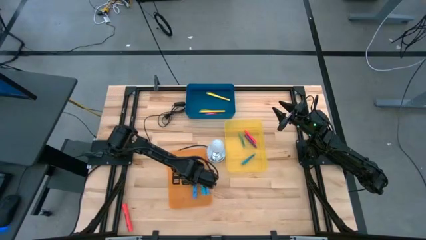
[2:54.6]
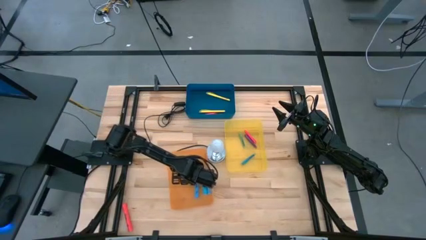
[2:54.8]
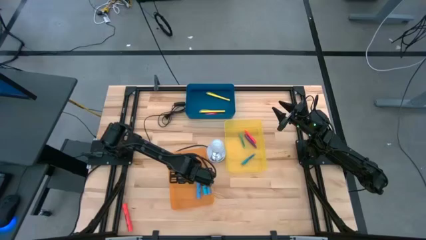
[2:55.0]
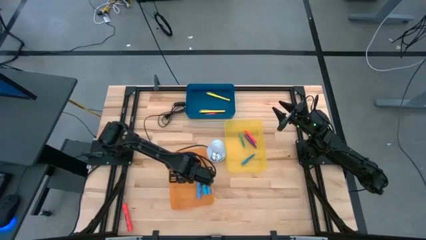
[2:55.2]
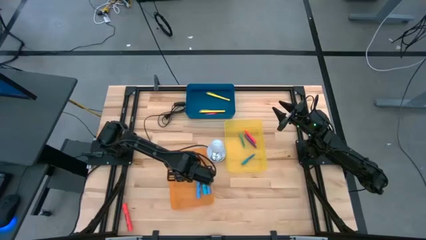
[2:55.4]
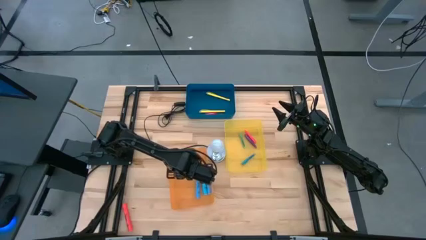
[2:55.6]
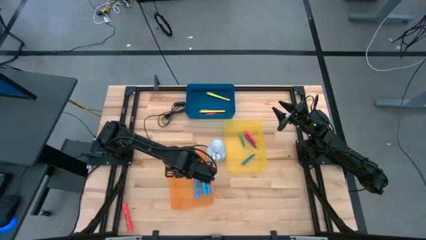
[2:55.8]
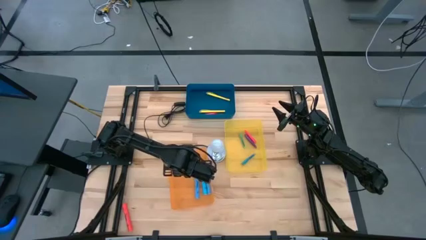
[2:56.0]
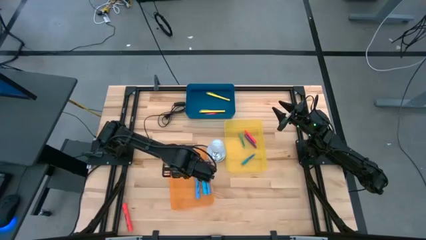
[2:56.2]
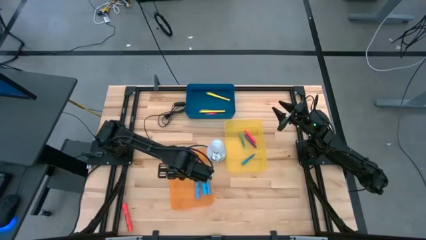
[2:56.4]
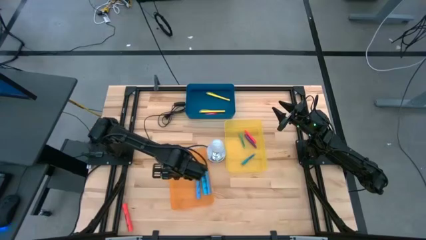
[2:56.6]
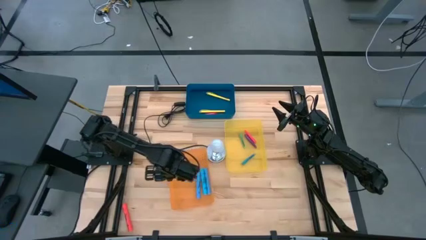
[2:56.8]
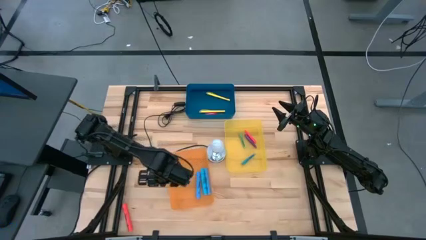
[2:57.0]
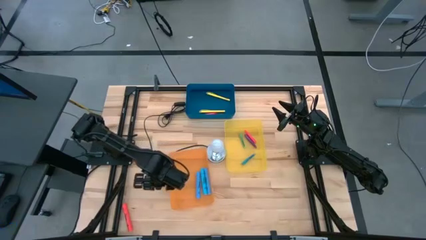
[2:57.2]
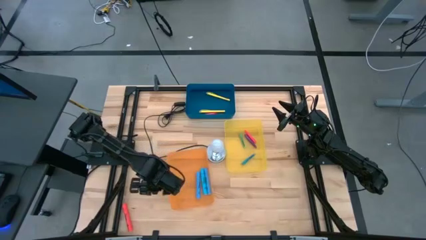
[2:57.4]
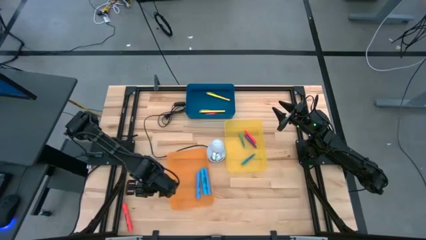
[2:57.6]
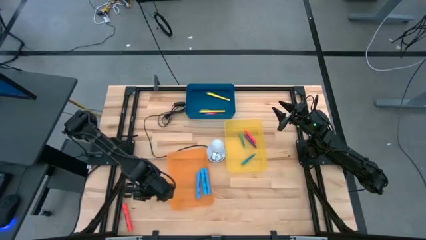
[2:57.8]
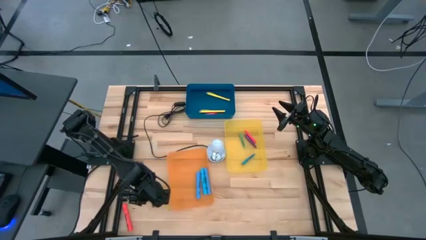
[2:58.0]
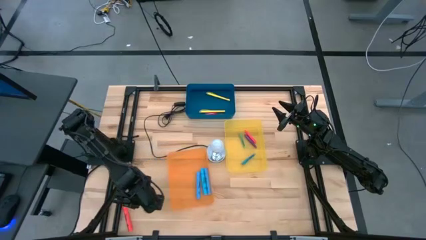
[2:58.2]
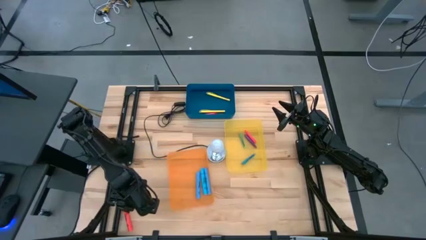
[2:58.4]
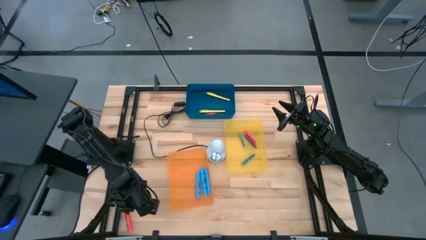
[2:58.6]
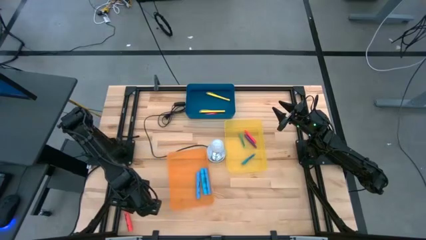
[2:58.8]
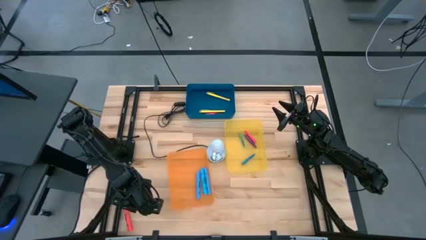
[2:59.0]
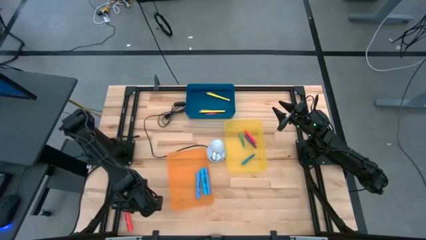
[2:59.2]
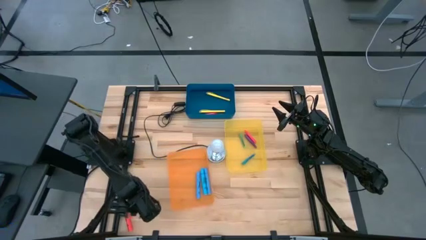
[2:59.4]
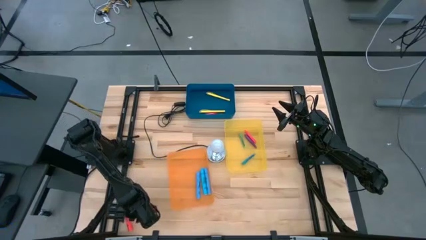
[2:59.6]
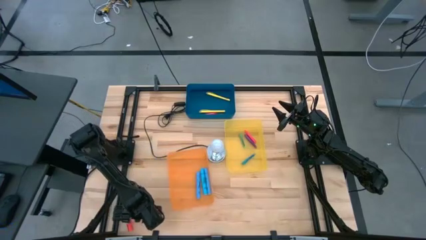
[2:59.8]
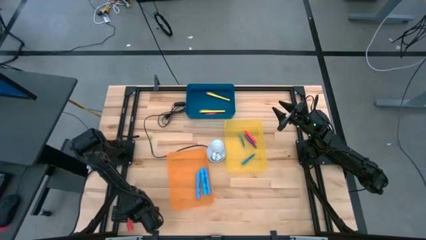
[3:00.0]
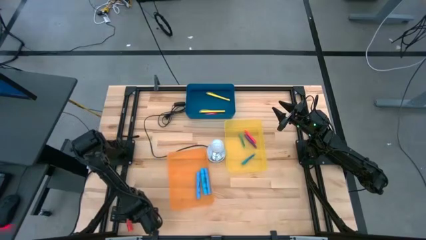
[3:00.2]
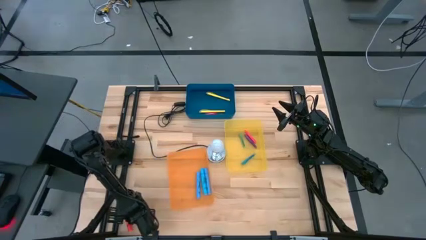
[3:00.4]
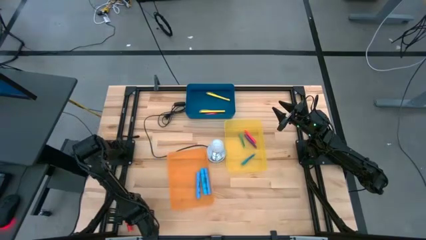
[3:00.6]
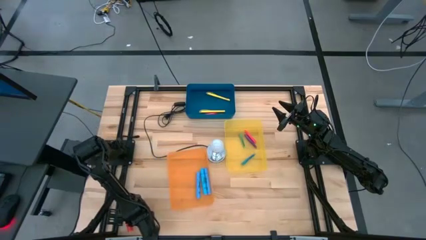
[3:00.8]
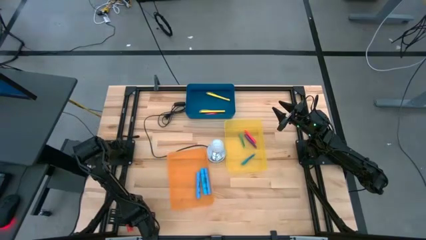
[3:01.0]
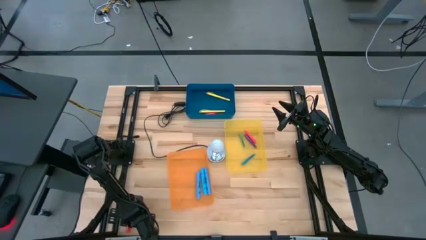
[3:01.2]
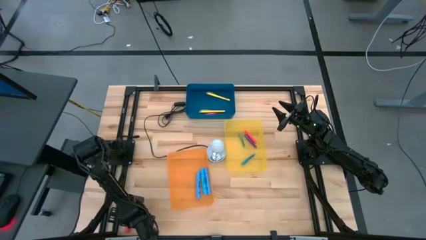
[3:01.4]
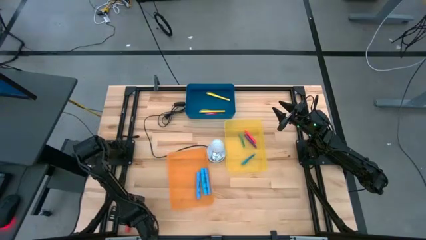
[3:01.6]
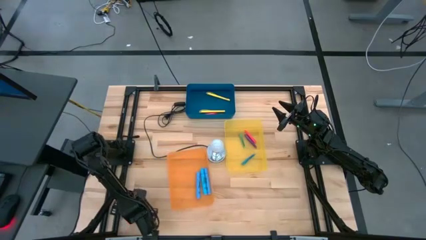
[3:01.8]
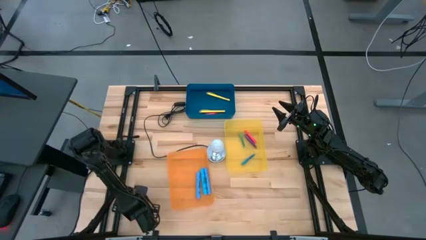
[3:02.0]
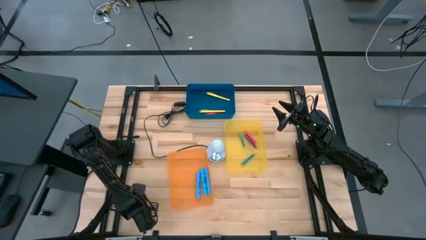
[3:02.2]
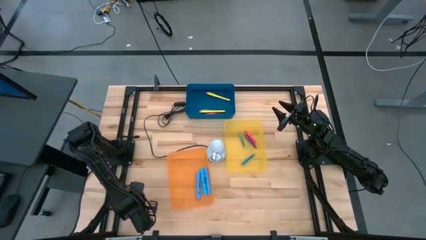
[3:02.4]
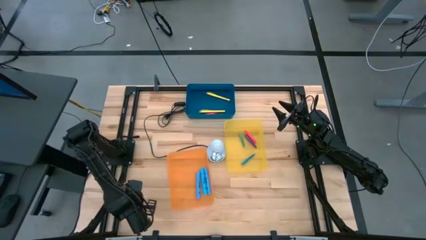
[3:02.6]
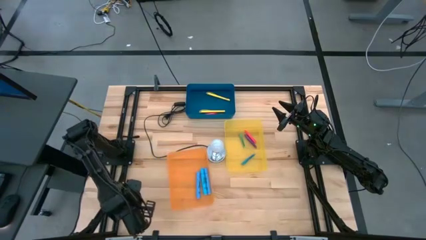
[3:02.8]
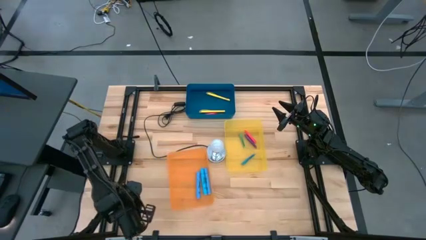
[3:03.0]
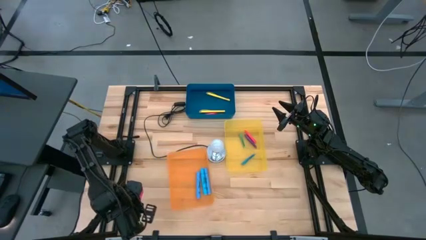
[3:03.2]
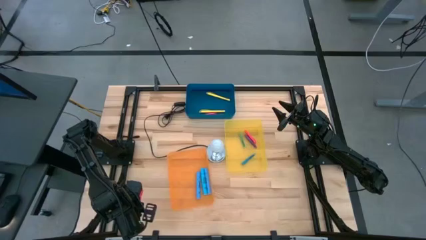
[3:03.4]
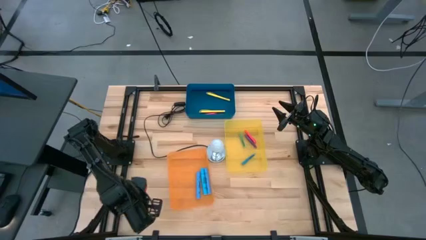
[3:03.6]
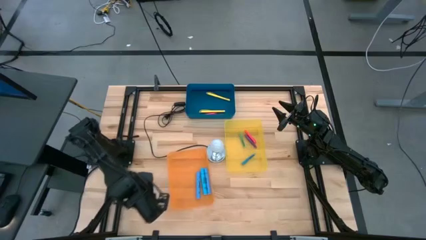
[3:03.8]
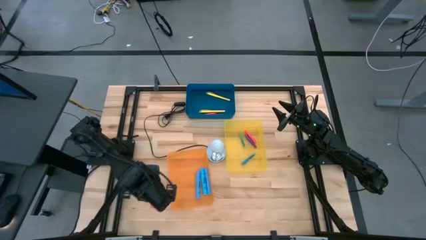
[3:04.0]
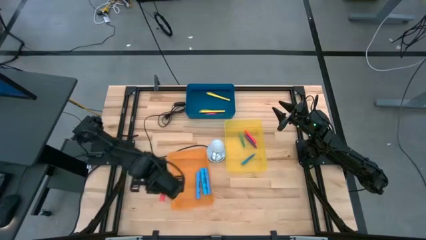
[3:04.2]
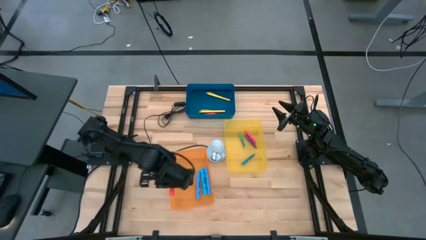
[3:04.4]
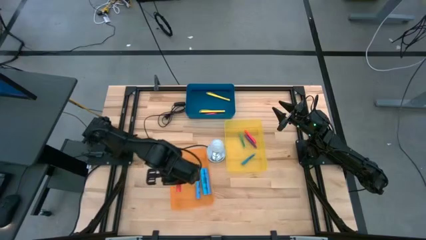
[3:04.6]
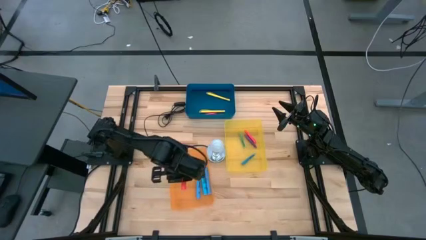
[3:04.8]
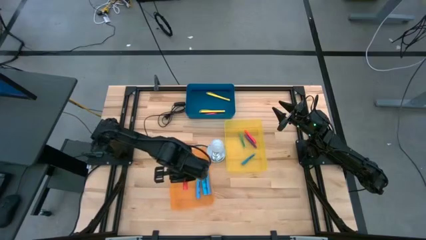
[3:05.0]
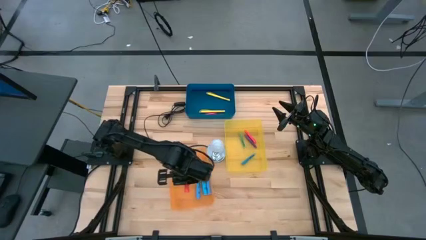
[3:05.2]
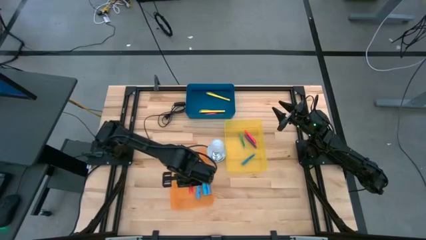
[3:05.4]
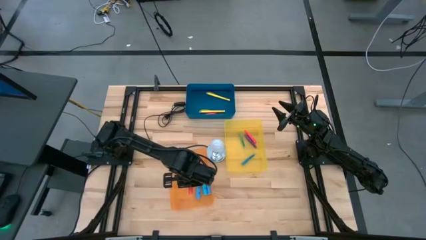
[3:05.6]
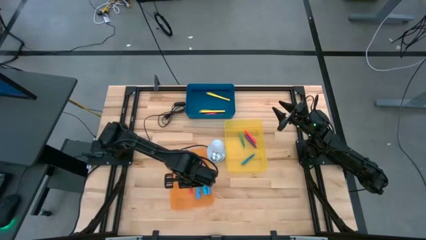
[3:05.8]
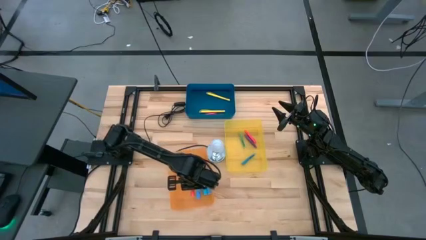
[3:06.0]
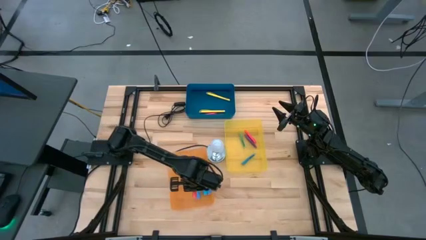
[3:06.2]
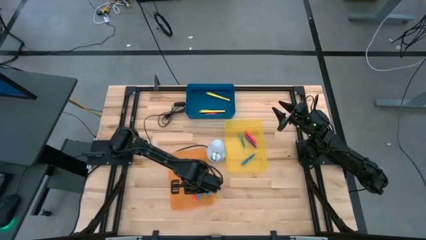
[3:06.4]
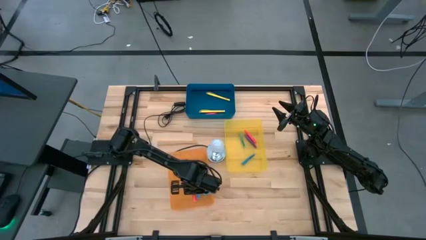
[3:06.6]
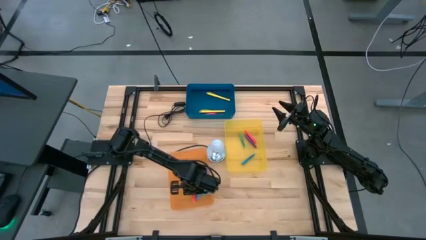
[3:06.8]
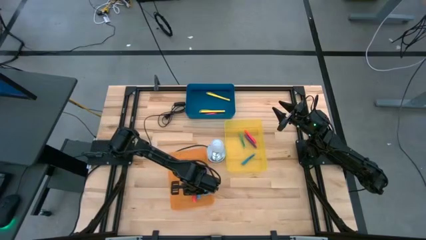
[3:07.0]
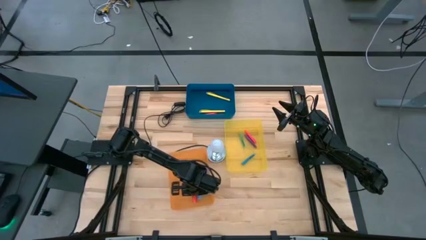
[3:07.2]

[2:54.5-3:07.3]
Task: Pick & Place Markers
Put the pink highlighter pen into the orange bin
